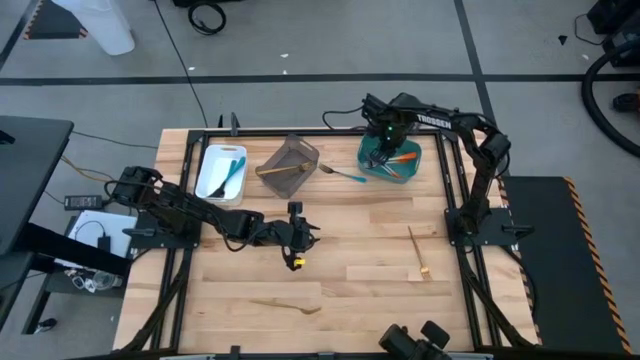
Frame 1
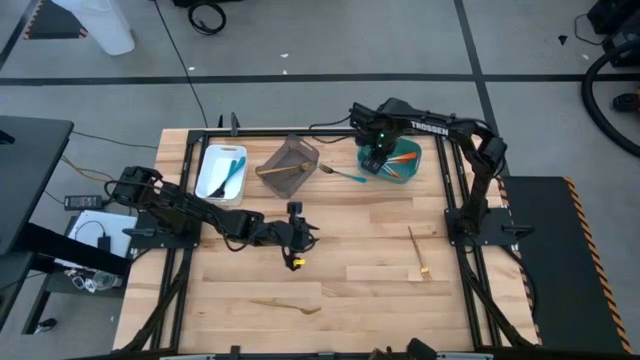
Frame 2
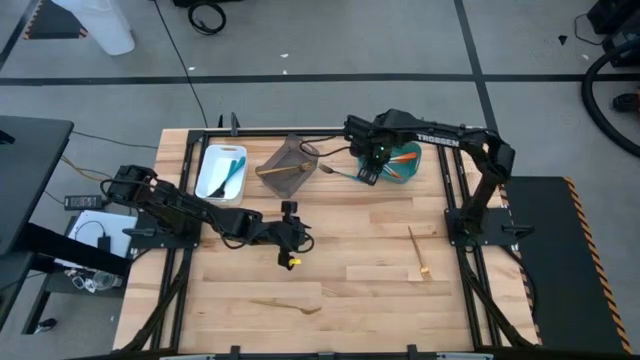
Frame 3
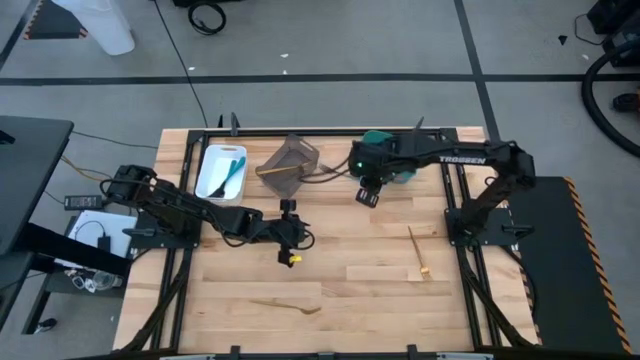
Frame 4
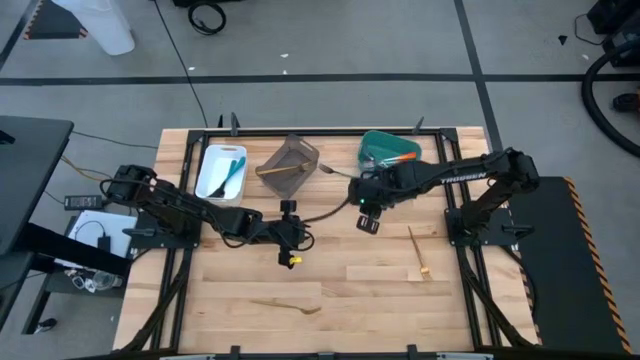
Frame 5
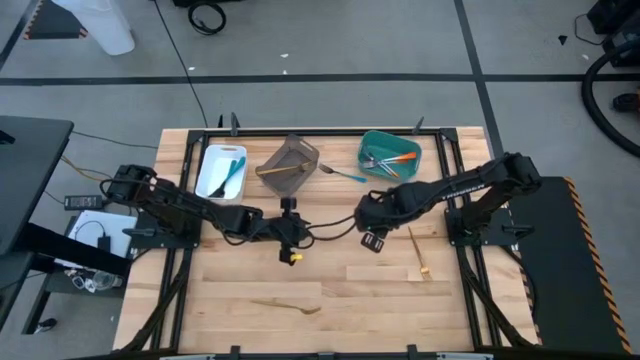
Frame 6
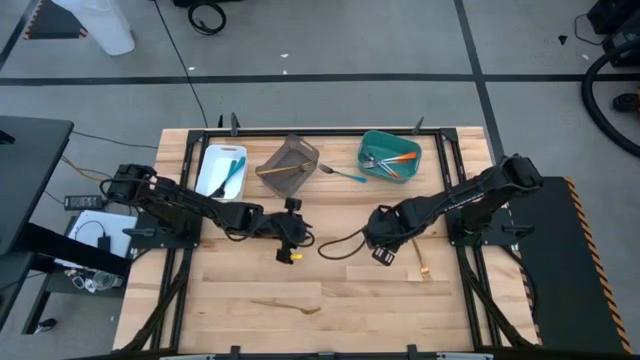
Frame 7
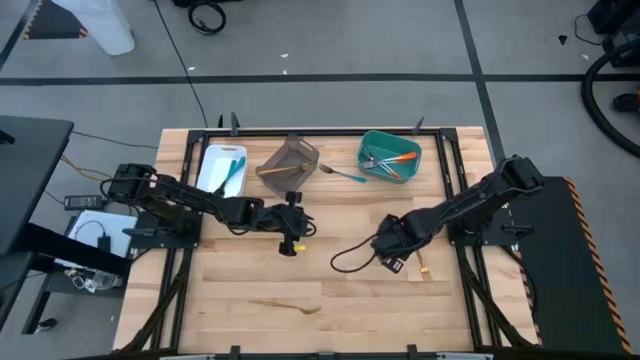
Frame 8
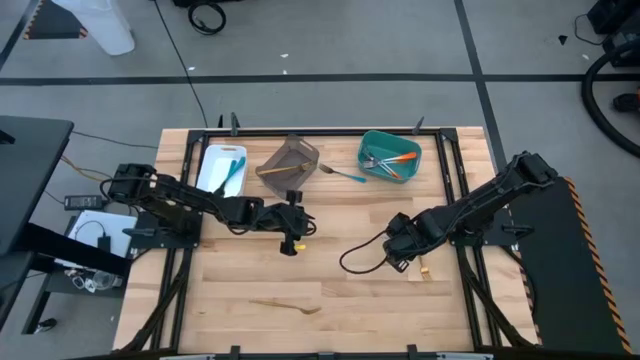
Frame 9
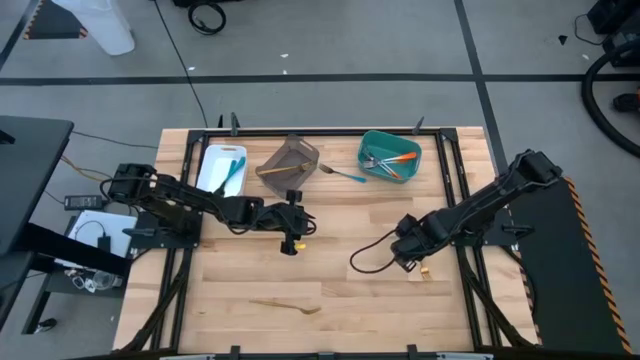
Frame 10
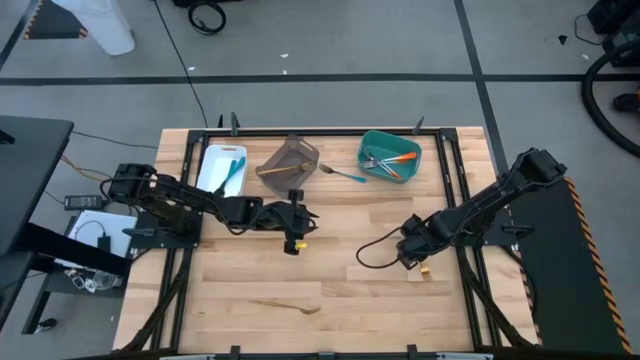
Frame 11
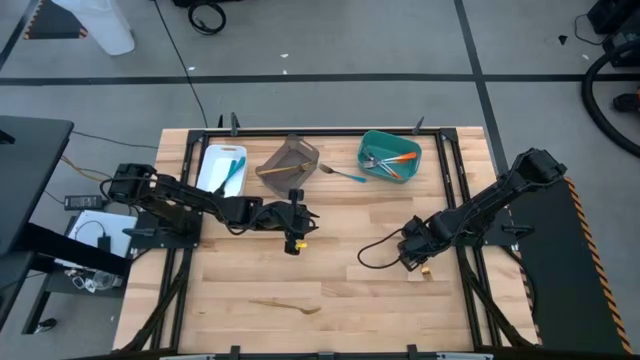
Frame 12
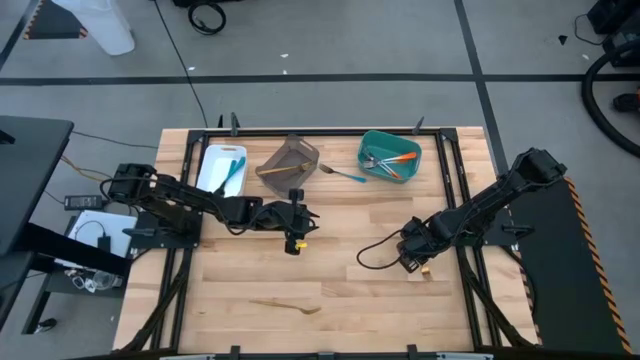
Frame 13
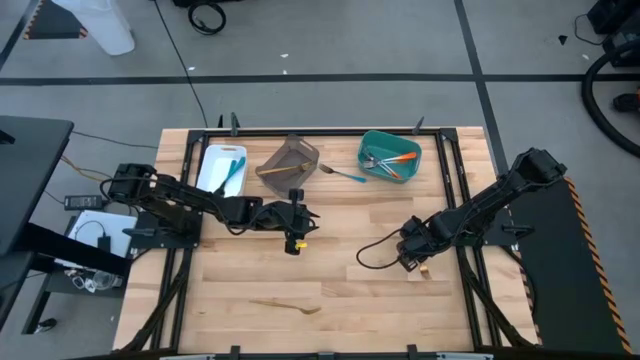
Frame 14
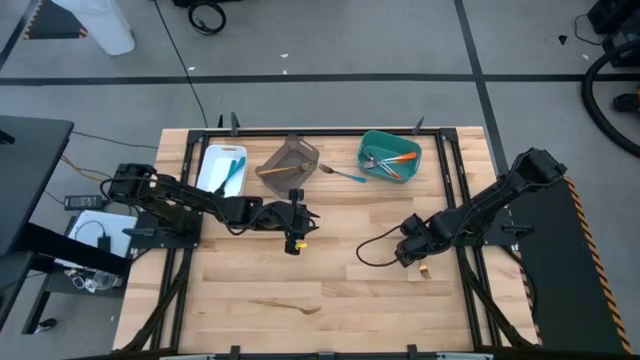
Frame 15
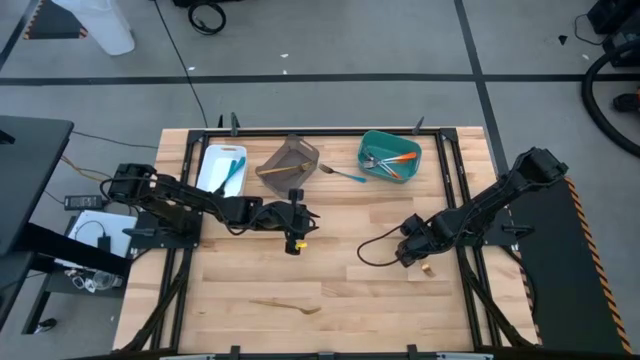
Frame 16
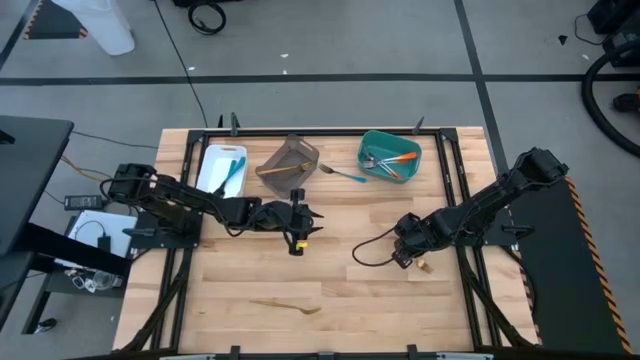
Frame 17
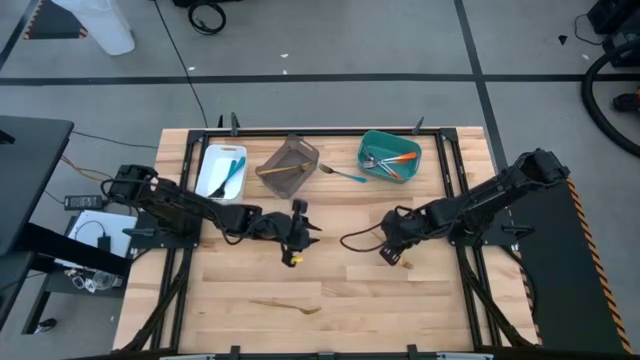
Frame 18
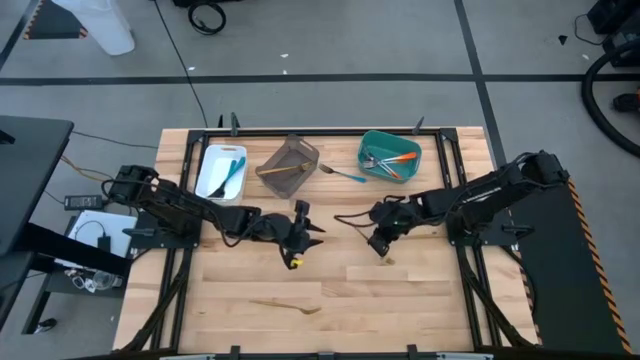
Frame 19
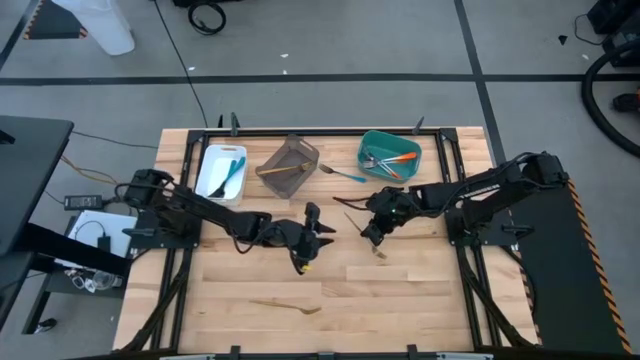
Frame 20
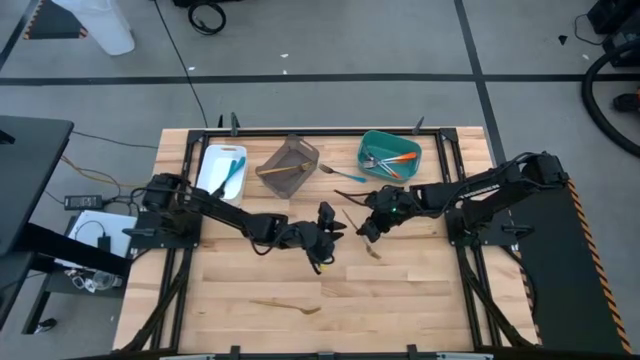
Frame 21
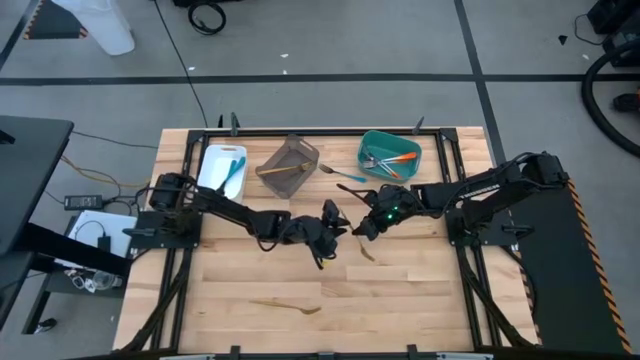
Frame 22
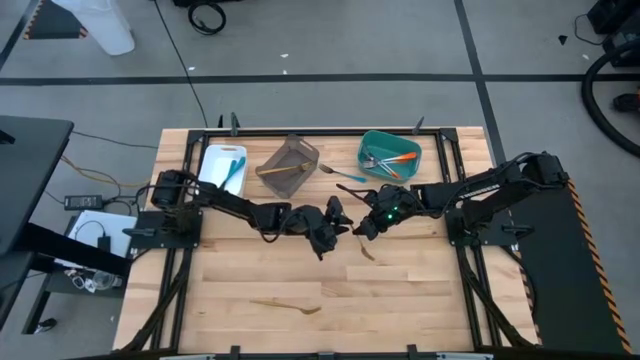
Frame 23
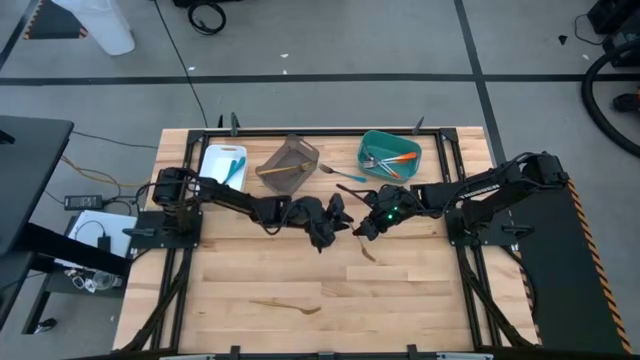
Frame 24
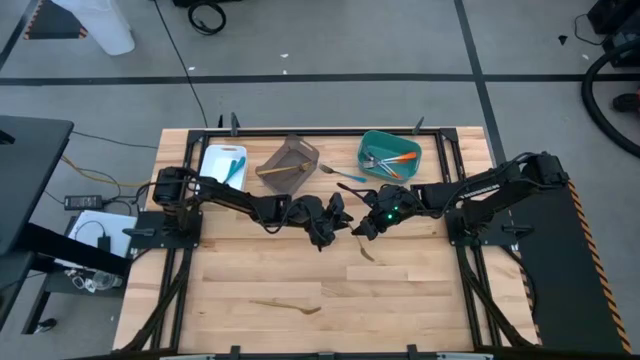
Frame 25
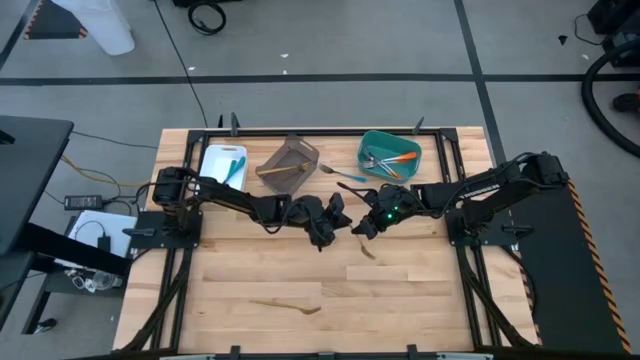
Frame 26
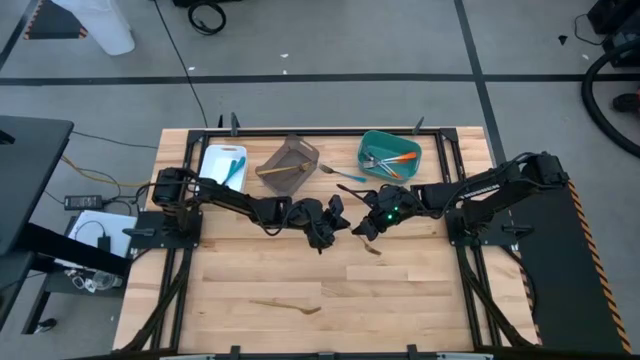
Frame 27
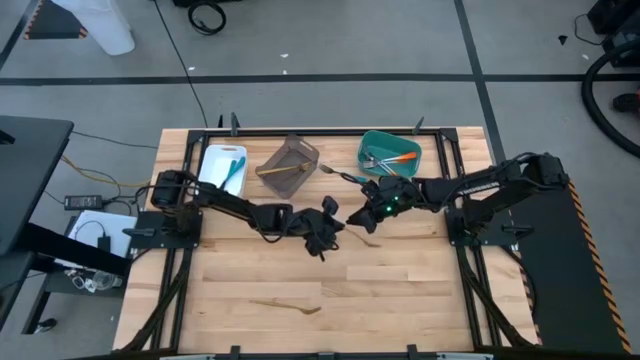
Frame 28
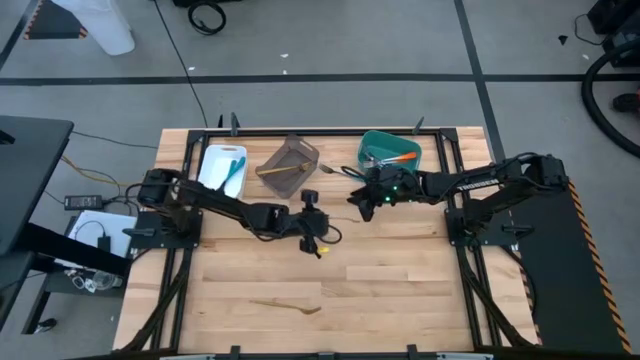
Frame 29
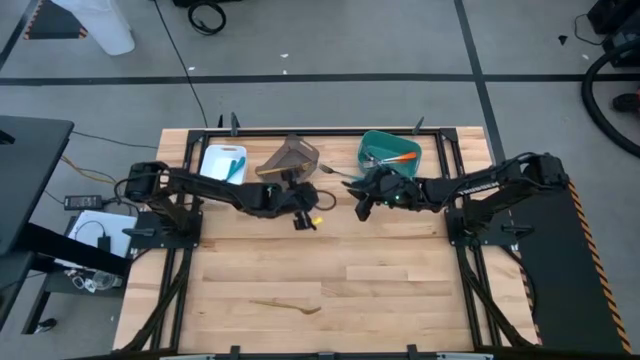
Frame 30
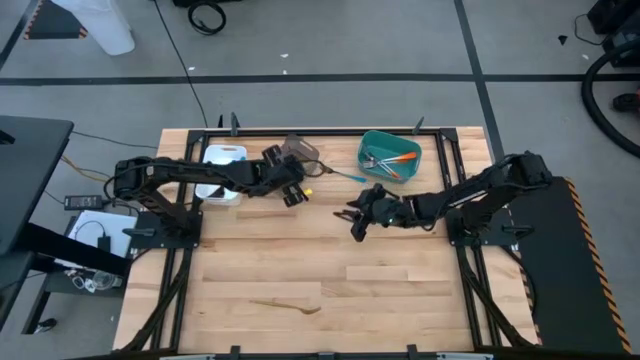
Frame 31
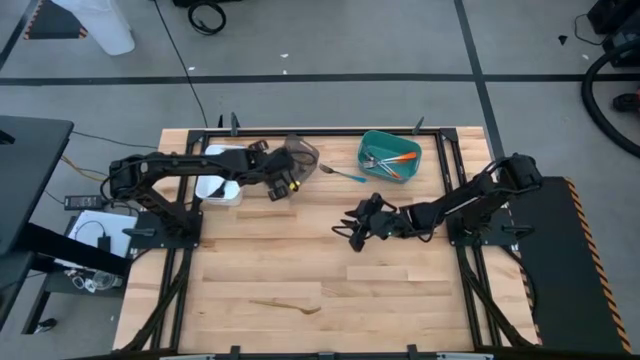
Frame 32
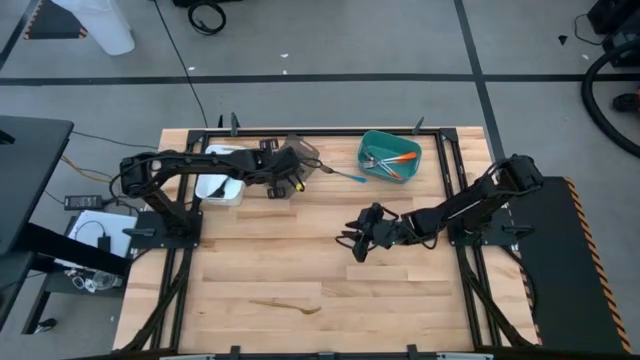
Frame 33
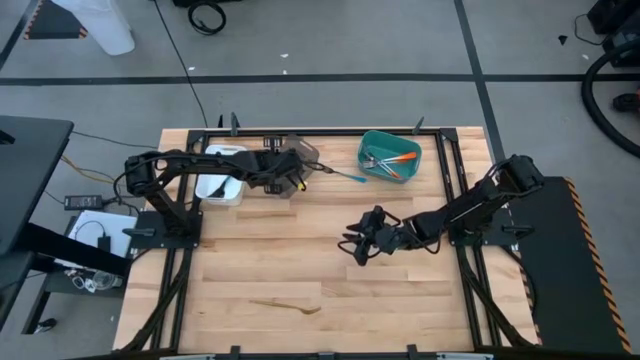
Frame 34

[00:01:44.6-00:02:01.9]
Task: Sort silverware by color (type)
Put the top gold fork into the black bin

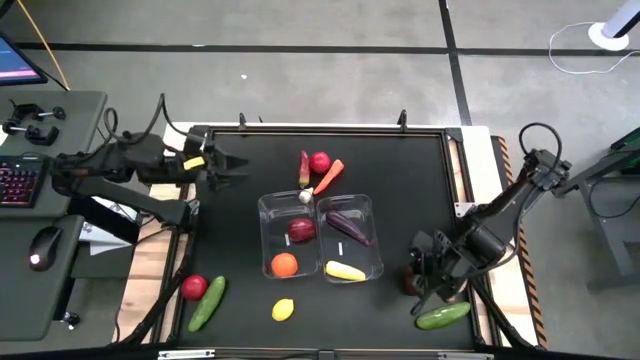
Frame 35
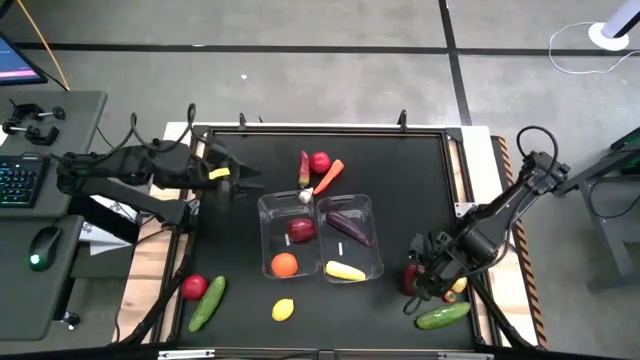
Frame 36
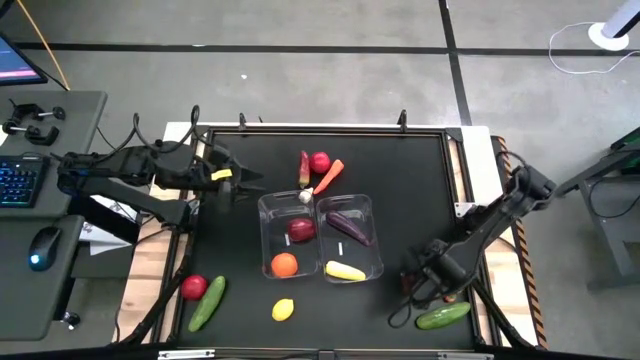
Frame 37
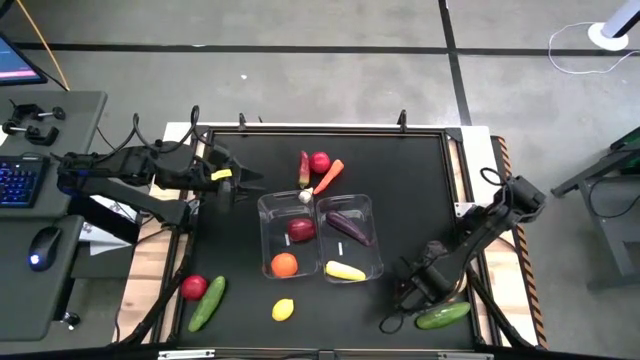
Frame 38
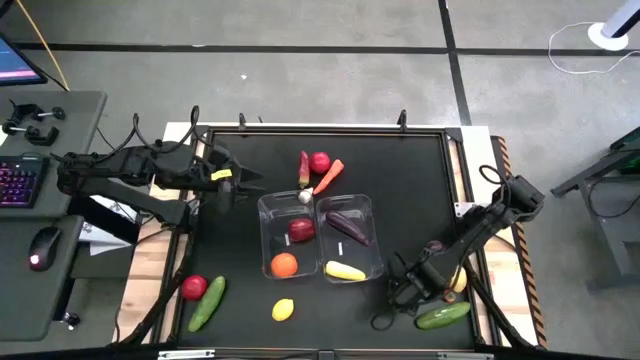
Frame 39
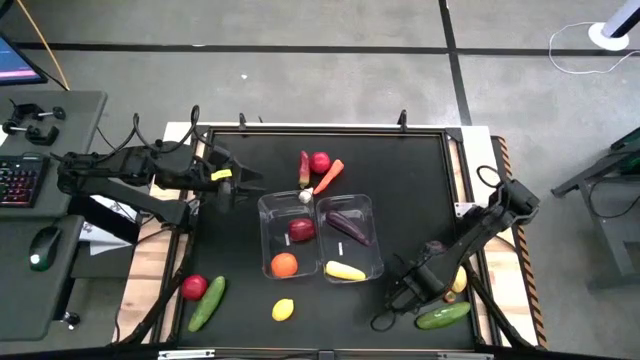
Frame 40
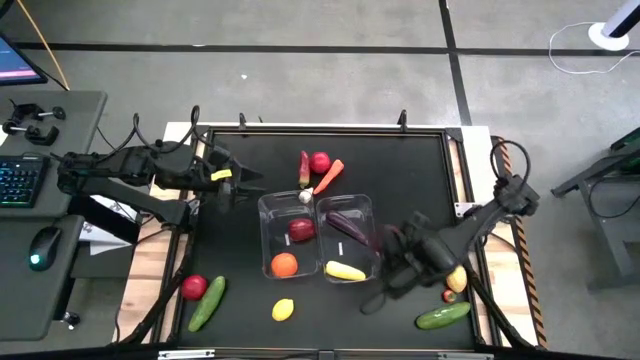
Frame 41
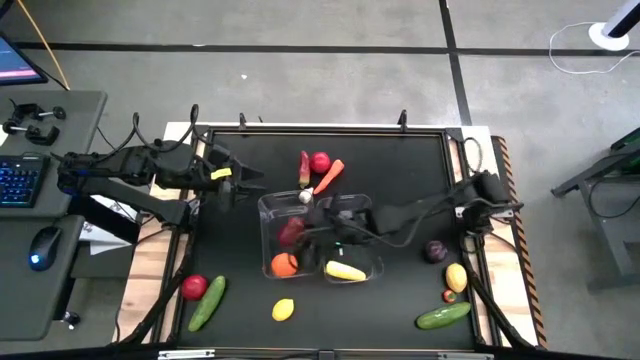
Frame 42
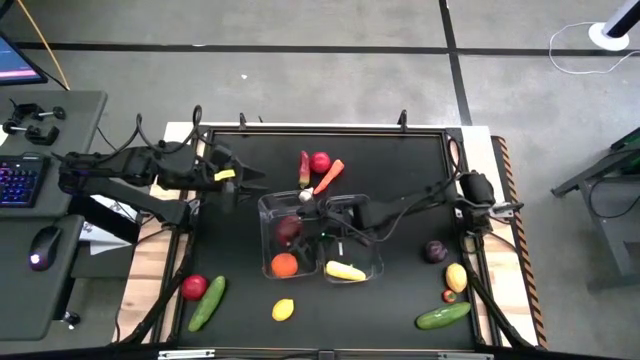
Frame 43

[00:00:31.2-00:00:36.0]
Task: Sort produce into baskets
Put the apple into the left transparent bin
